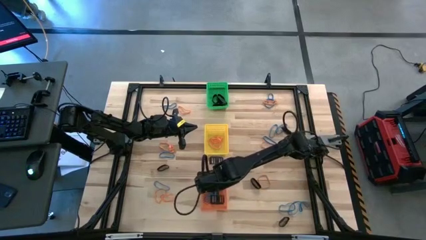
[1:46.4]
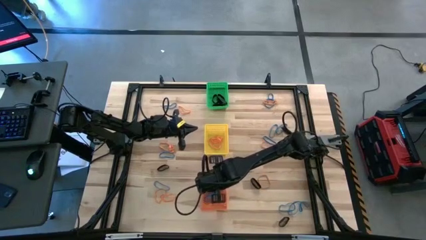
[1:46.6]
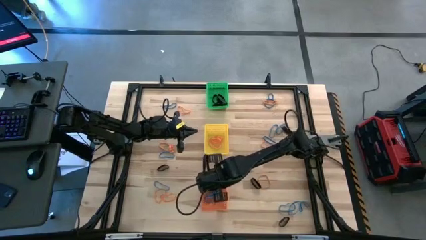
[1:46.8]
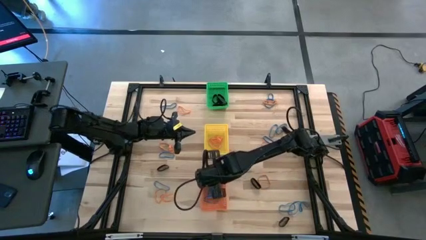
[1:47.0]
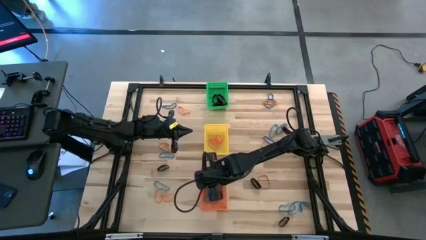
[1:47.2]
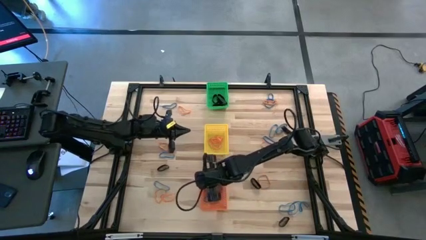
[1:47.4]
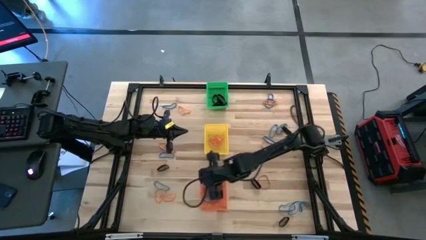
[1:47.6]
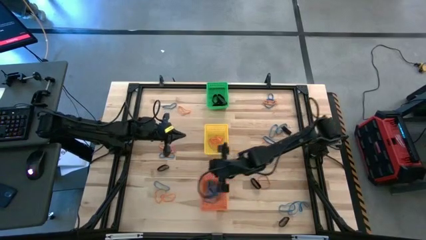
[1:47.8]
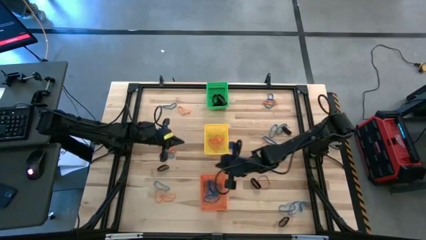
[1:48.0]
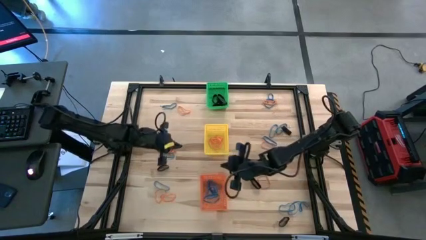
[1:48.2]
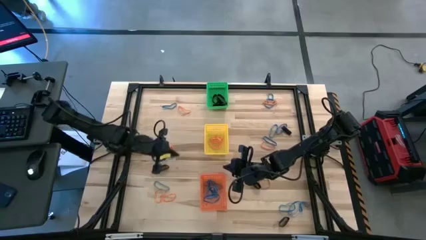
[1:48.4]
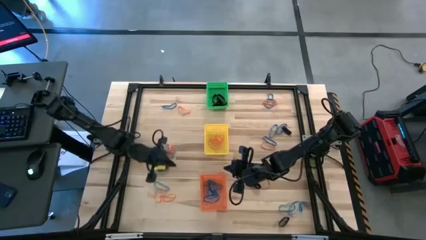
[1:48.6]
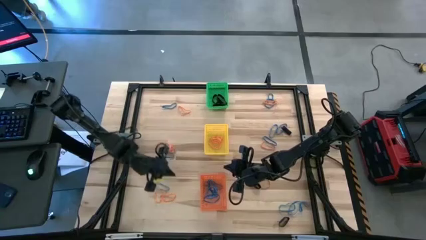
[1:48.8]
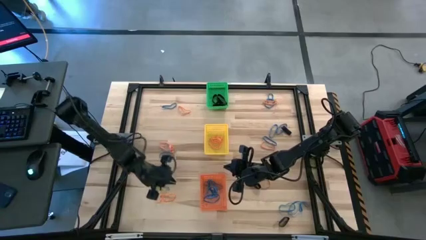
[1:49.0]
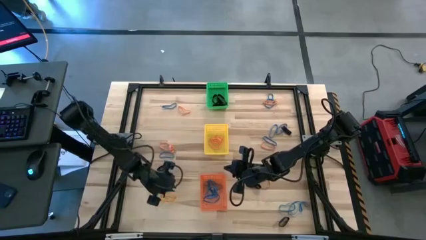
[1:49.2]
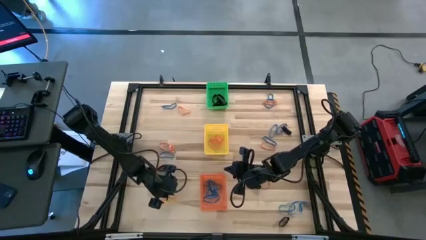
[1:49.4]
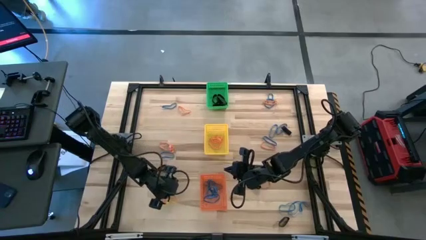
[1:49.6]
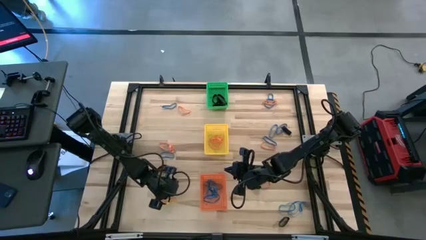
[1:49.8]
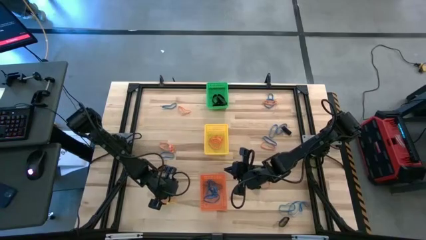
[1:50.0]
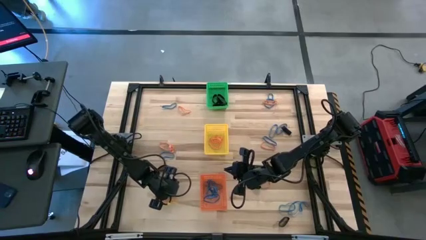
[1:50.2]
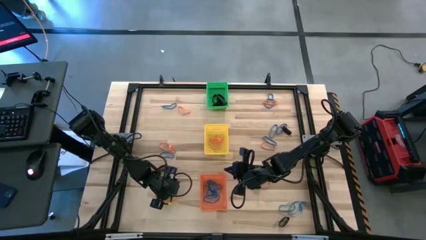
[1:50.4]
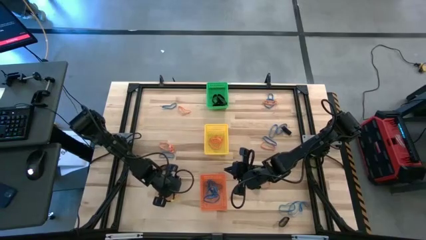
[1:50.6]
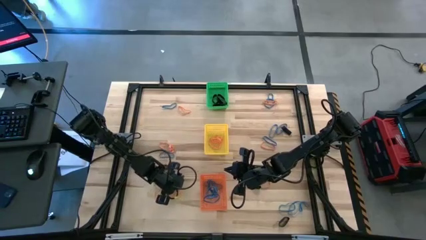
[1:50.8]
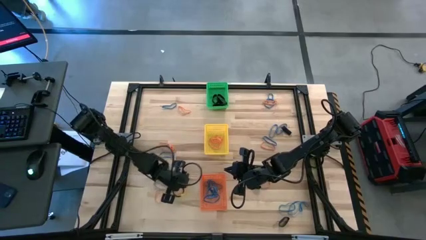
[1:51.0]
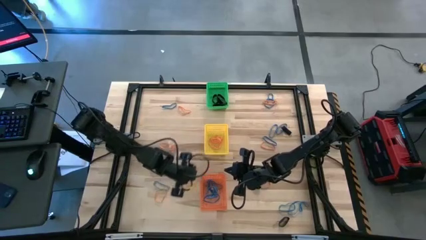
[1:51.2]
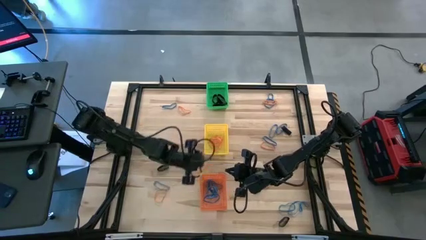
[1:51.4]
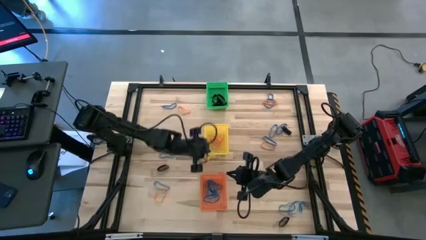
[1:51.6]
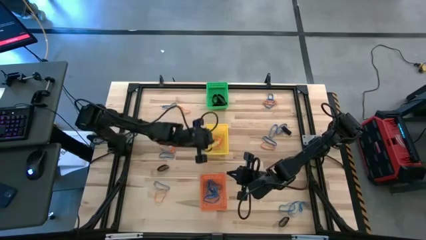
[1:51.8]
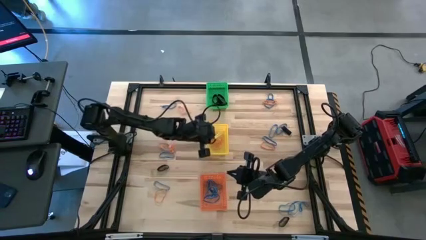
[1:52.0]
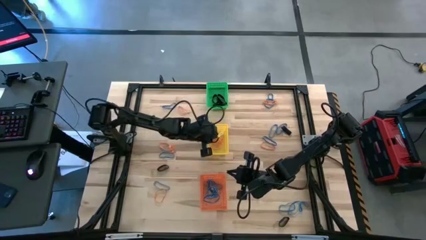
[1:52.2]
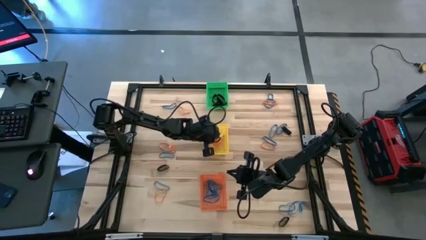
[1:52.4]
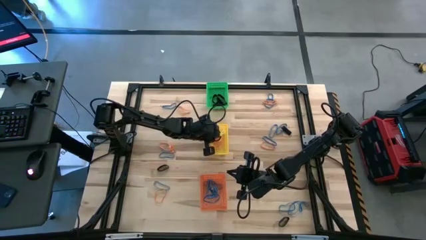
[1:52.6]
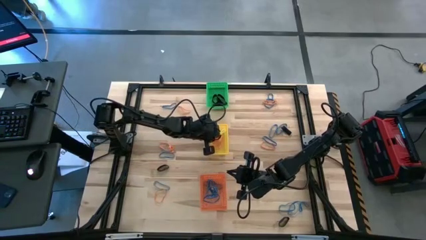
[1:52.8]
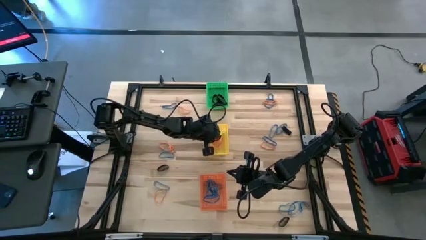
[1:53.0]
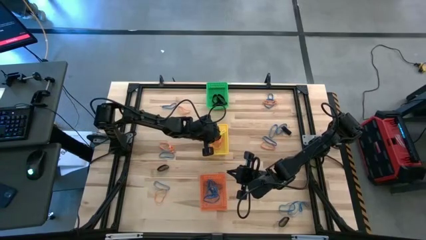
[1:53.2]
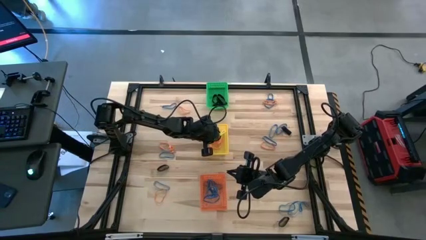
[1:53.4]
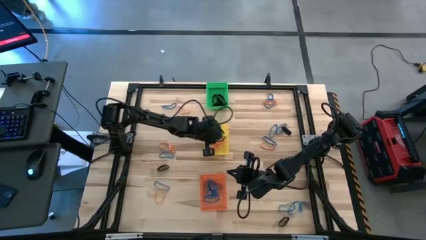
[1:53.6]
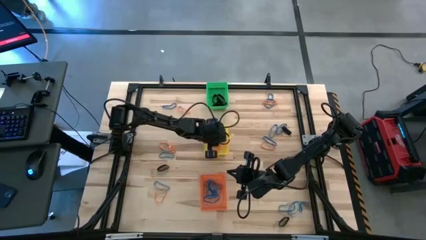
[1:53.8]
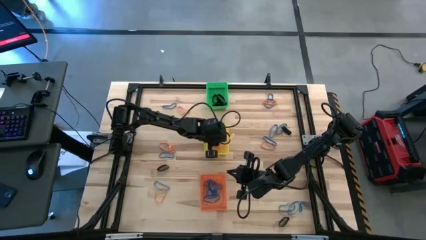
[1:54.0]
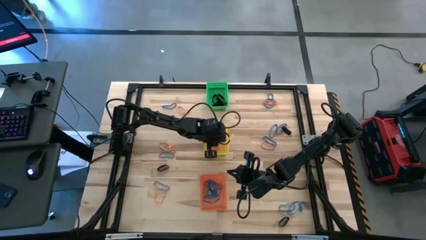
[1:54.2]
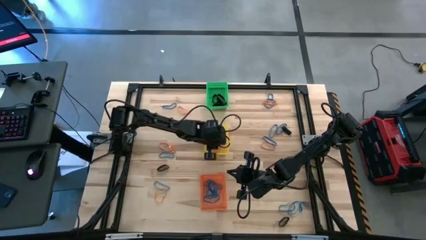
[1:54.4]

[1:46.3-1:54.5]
Task: Sort rubber bands into baskets
Put the orange rubber band into the yellow bin

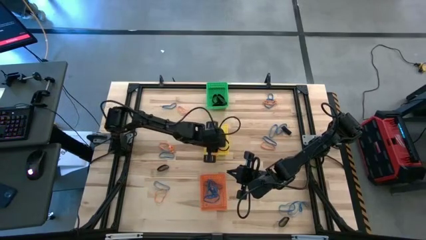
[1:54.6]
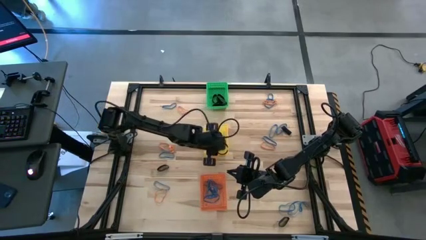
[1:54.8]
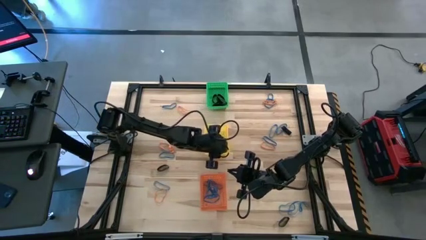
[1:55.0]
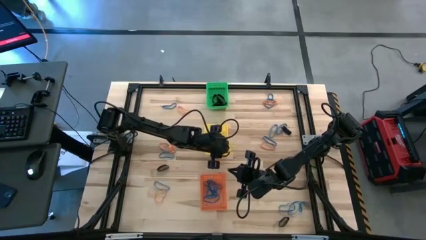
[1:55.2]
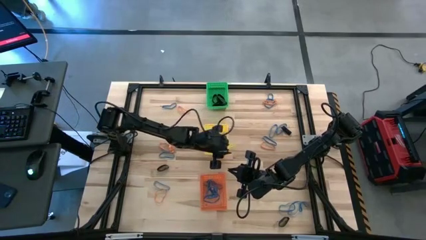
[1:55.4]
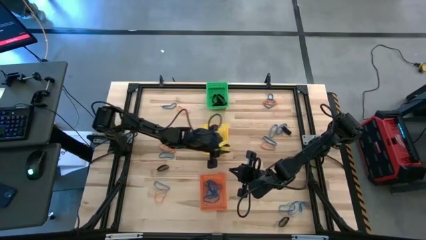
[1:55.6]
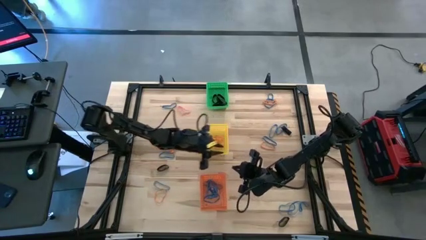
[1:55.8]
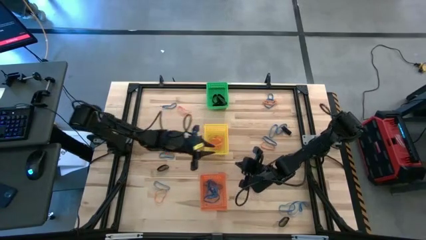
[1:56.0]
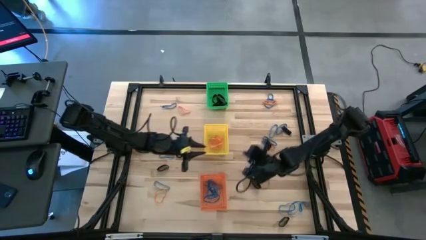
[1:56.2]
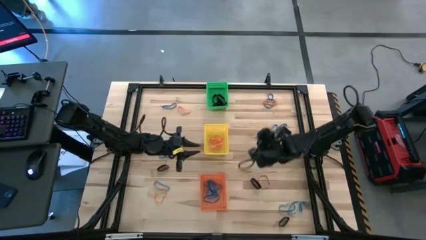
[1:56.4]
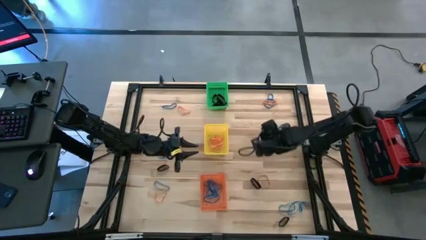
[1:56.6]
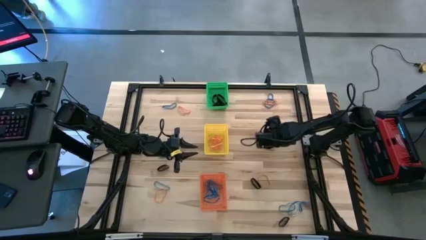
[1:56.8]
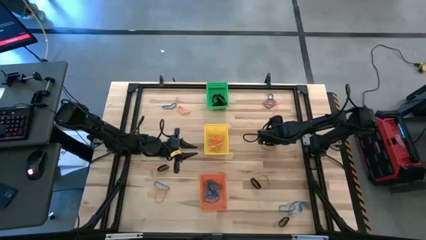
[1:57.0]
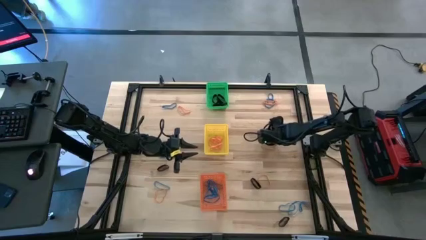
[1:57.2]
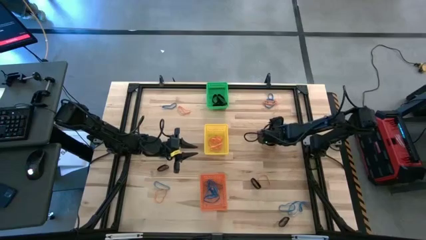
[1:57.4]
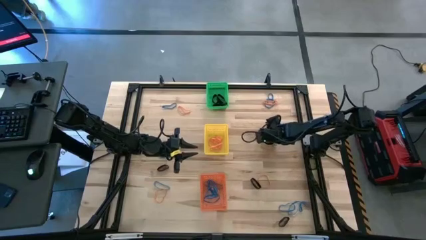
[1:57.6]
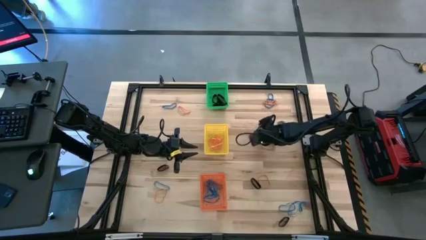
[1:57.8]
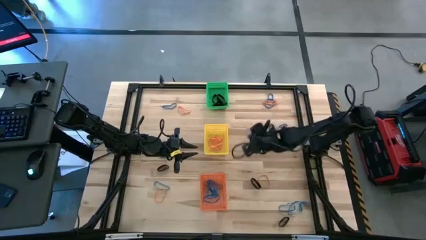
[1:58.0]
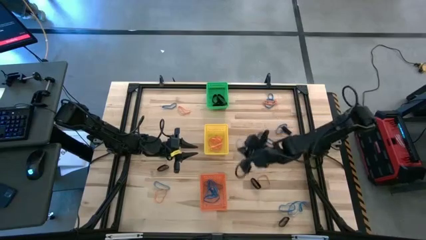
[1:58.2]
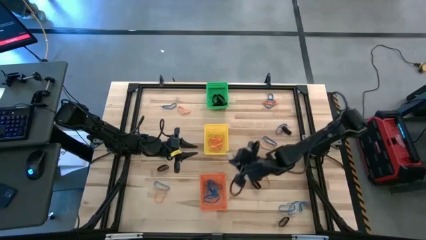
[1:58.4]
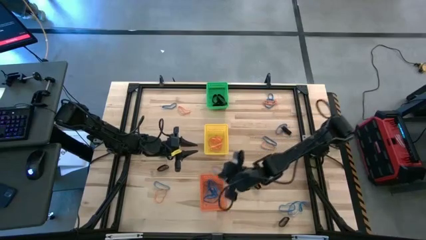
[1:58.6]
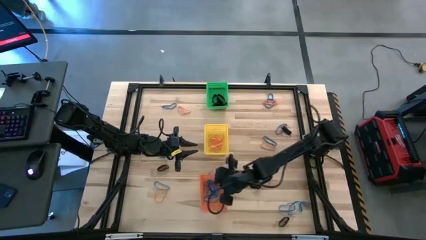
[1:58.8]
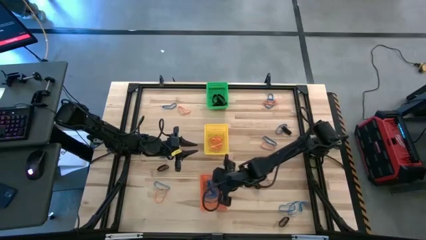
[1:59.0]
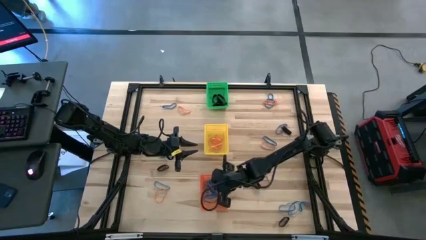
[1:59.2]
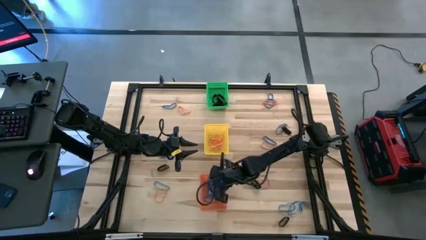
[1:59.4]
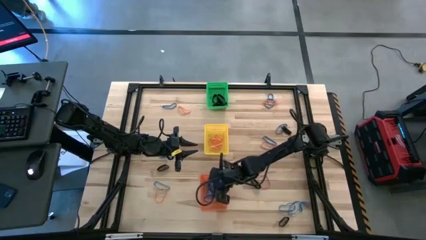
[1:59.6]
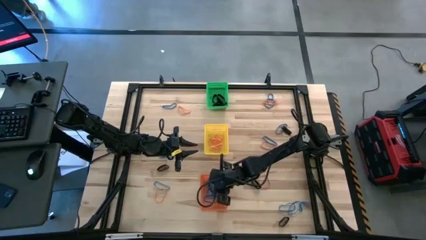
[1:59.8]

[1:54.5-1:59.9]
Put the blue rubber band into the orange bin

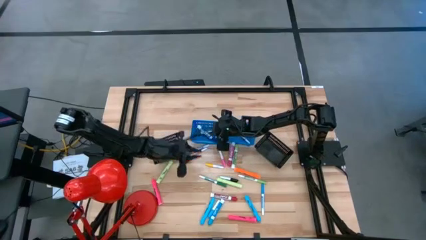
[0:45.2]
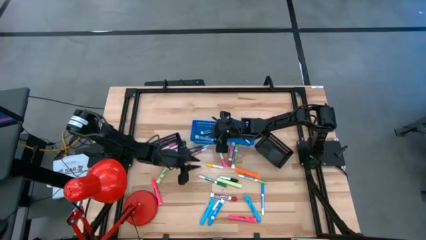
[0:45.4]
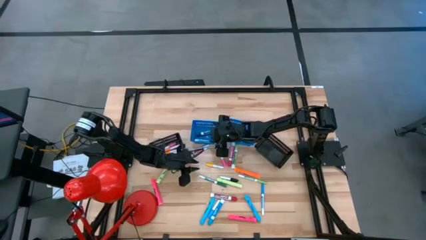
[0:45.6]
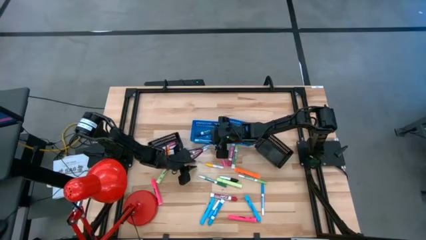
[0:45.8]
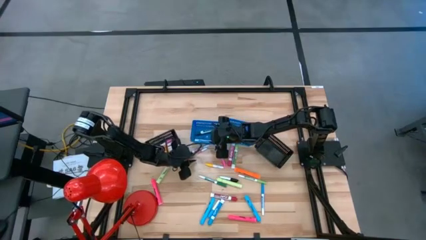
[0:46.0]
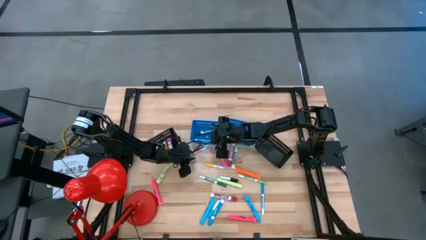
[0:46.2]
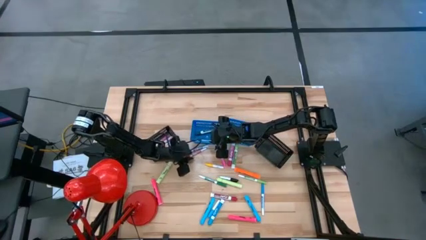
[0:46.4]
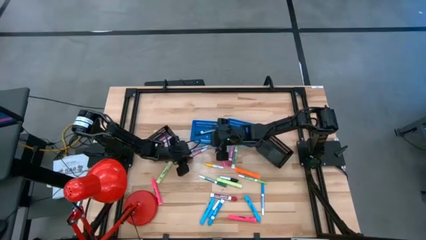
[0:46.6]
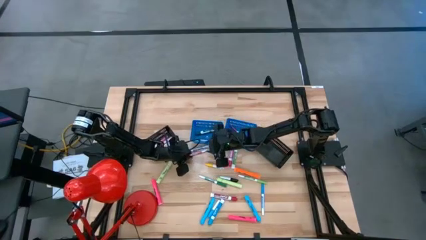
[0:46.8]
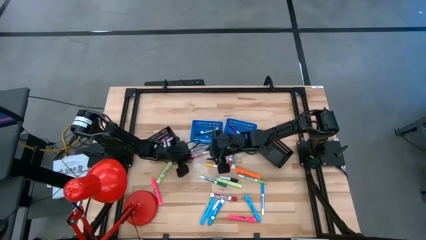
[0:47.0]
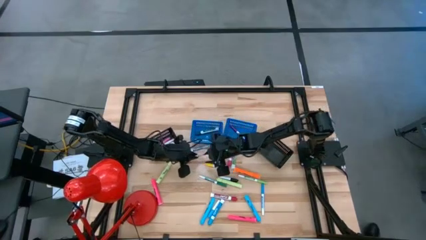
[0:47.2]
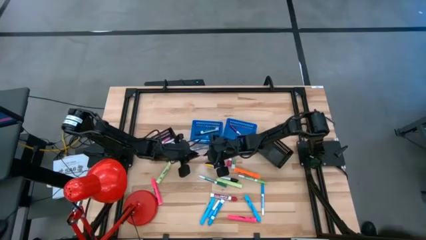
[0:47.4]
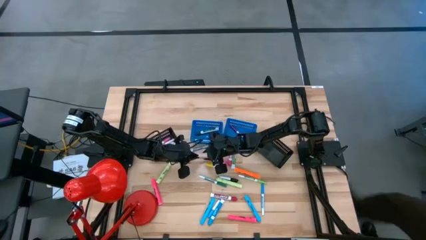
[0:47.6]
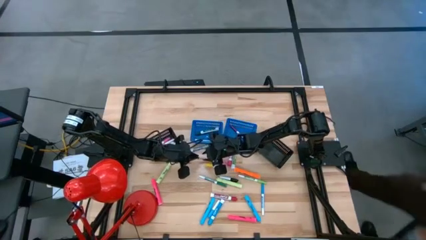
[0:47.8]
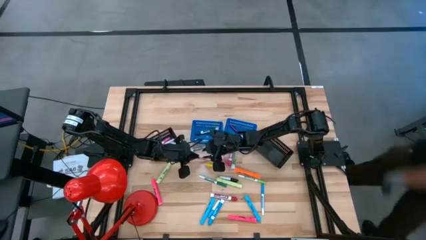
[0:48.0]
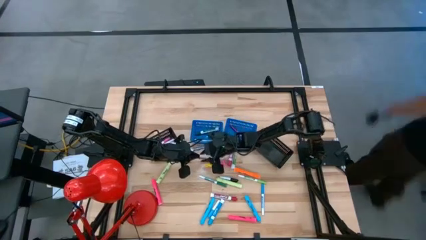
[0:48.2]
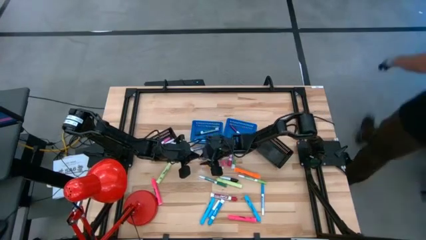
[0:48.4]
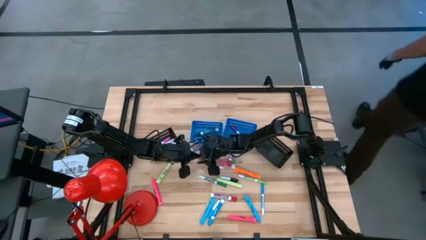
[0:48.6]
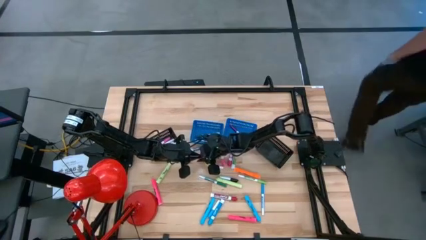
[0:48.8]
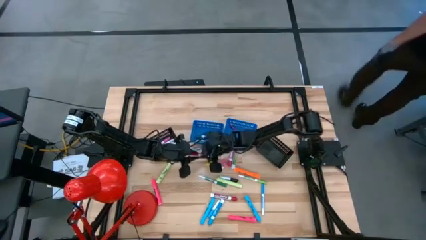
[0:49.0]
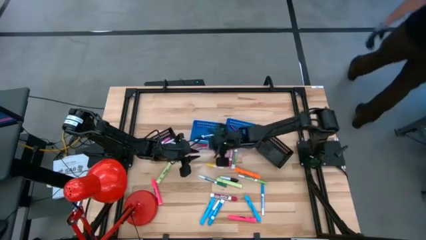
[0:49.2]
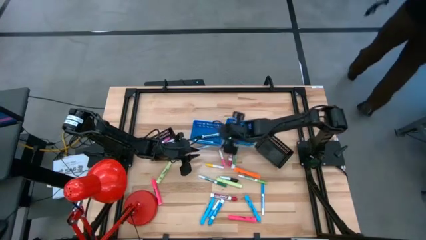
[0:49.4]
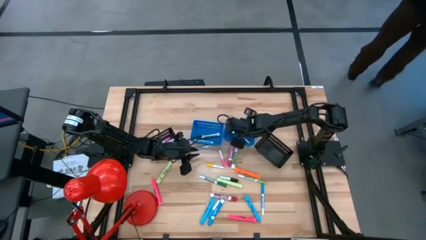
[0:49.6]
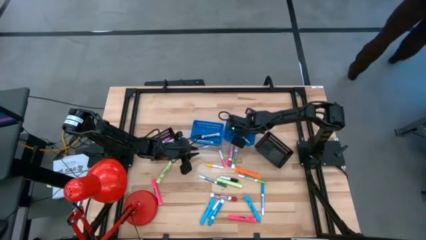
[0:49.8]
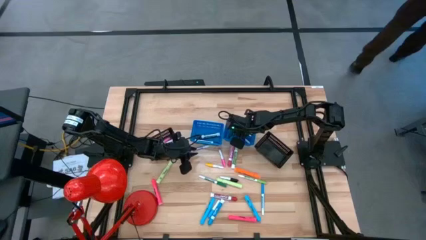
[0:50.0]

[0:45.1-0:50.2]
Task: Pick & Place Markers
Put the red alcohol marker into the right blue bin
